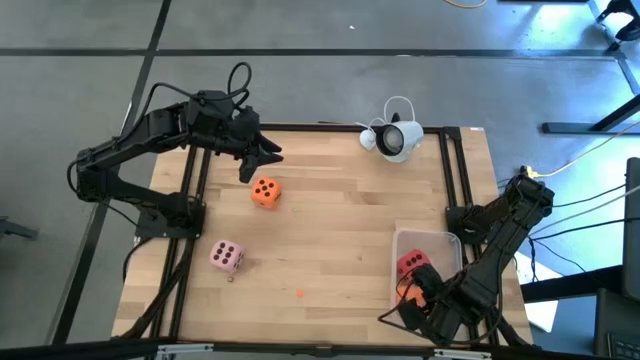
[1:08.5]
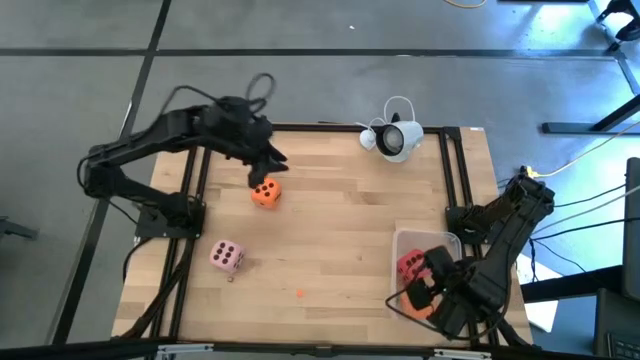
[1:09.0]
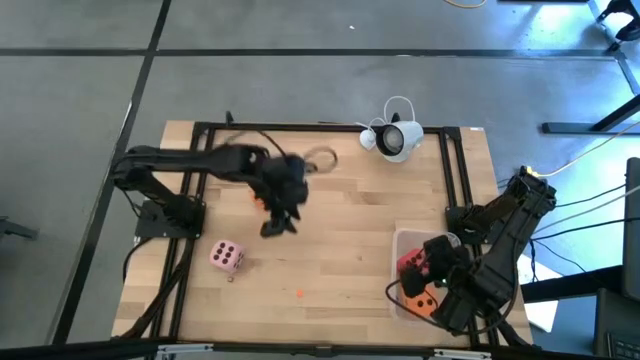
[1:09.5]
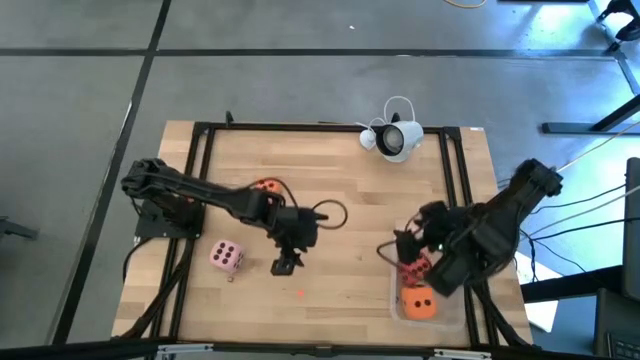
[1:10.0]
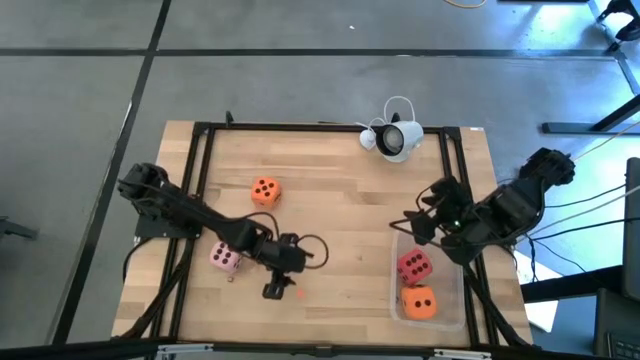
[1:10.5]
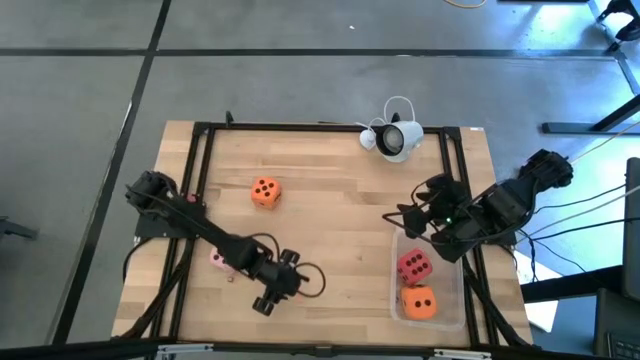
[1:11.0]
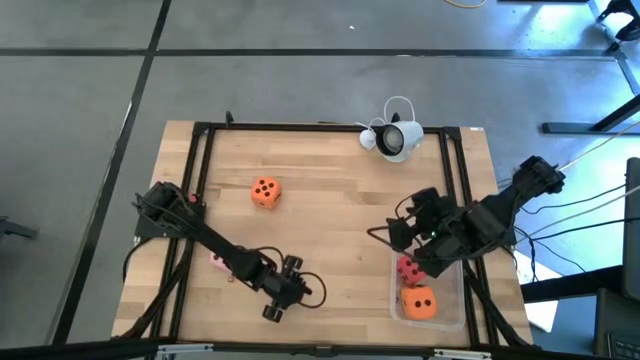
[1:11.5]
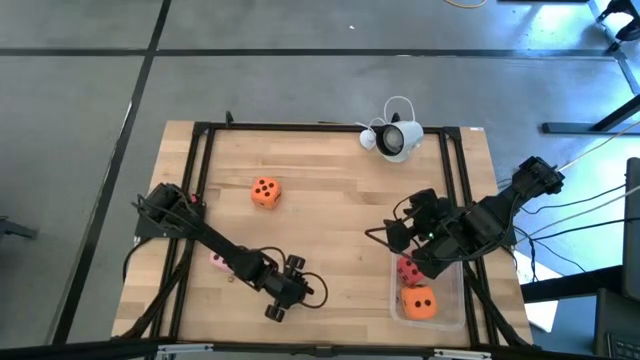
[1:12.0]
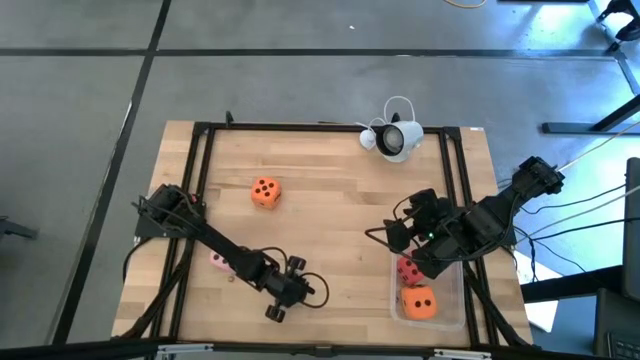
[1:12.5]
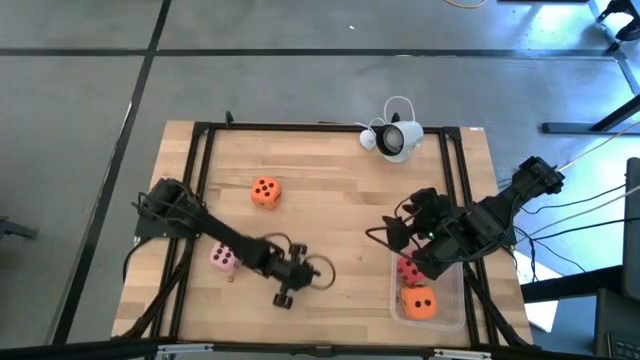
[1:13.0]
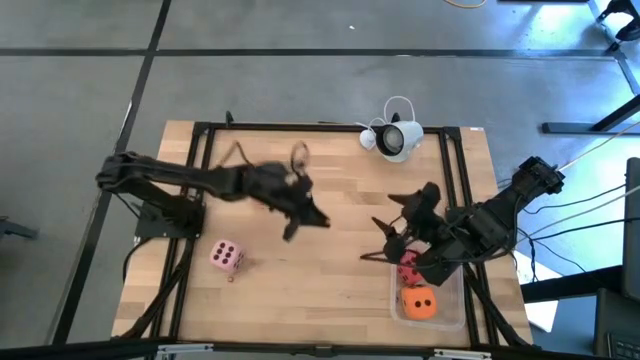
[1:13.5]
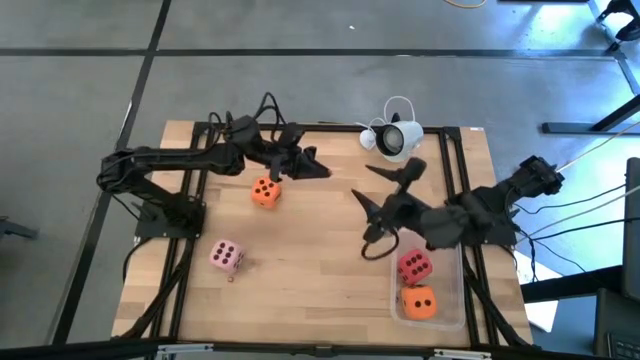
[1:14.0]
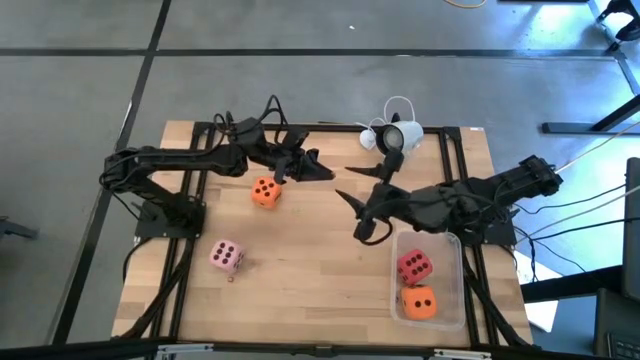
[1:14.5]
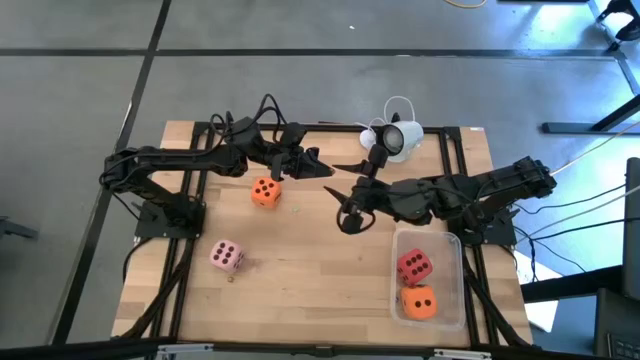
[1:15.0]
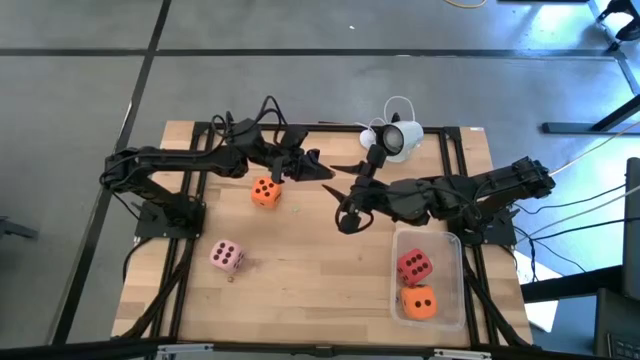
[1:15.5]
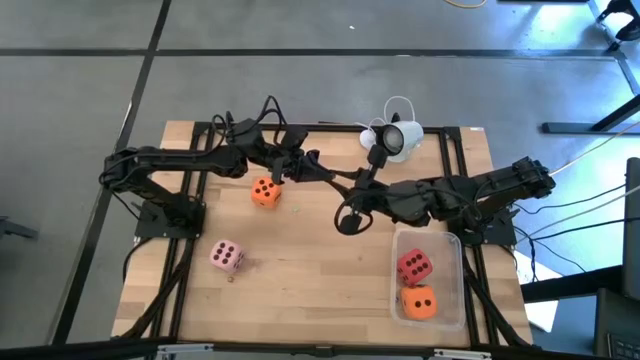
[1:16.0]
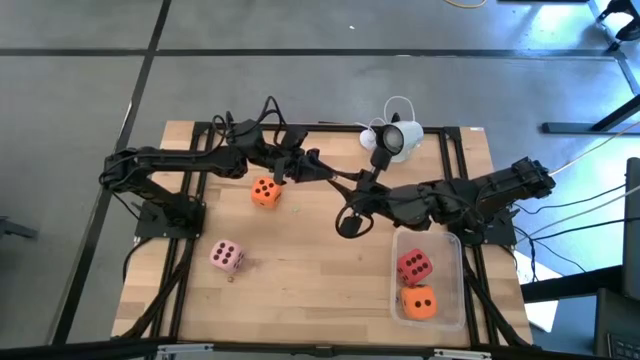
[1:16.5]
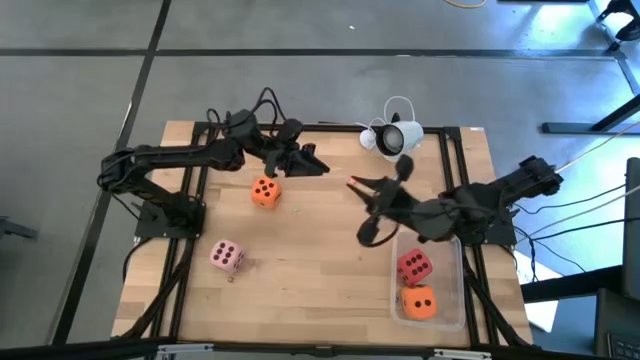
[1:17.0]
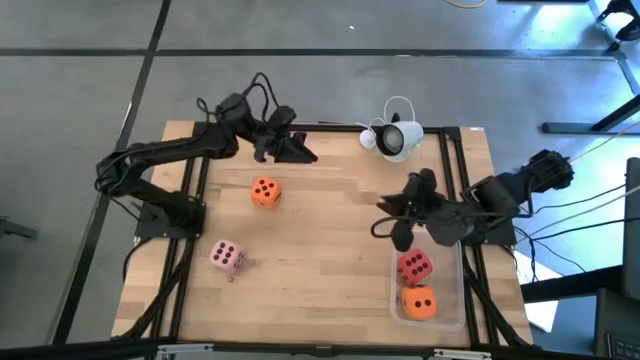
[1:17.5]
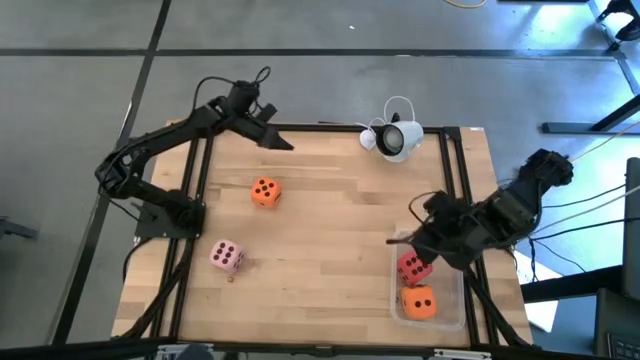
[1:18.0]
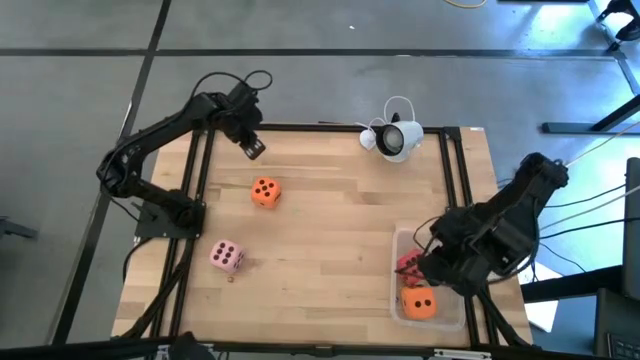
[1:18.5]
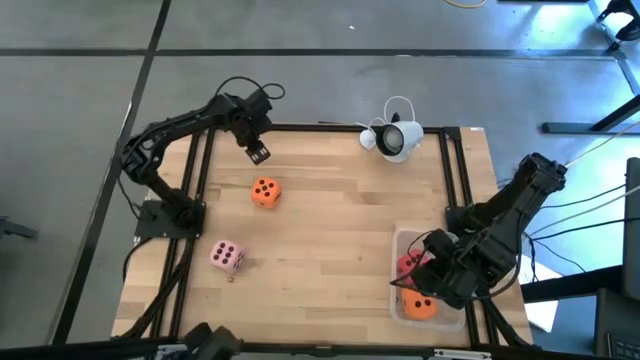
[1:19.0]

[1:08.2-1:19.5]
Task: Pick & Place Dice
Put the small orange die into the transparent bin

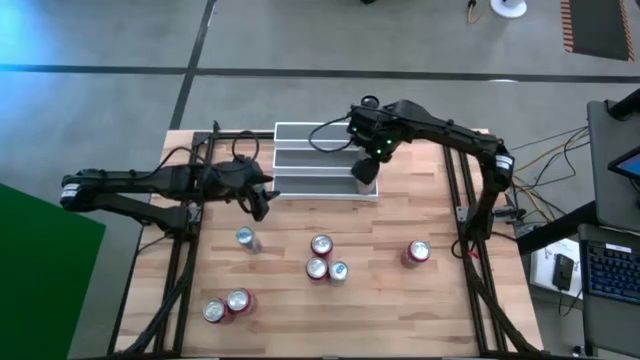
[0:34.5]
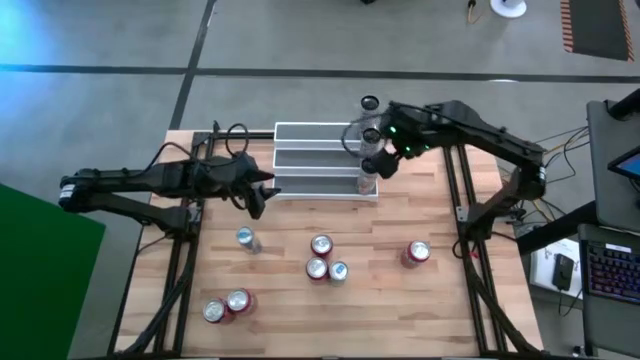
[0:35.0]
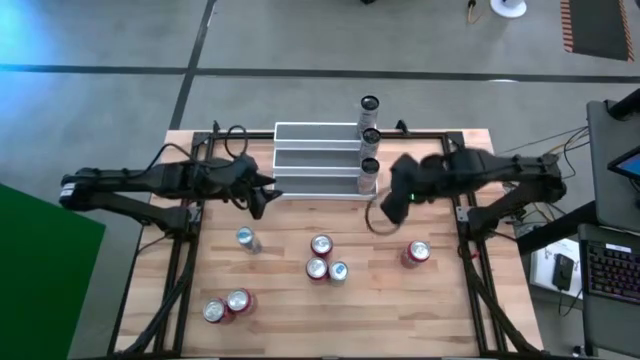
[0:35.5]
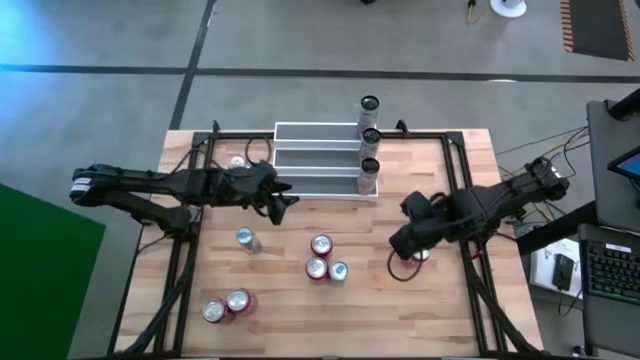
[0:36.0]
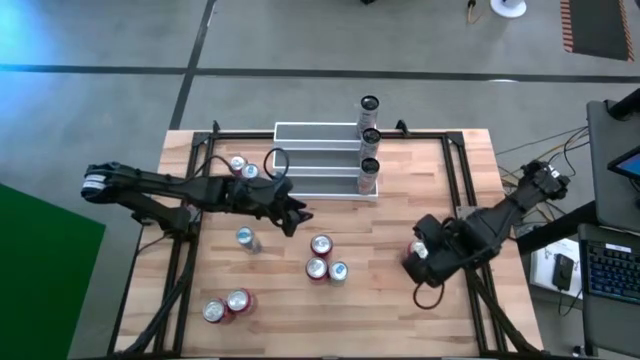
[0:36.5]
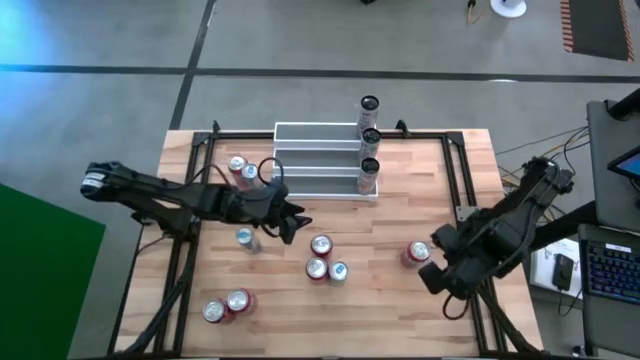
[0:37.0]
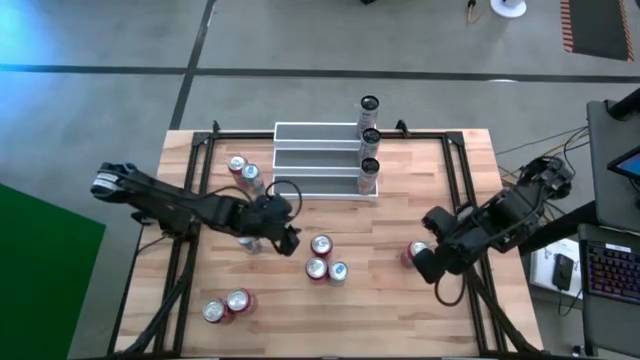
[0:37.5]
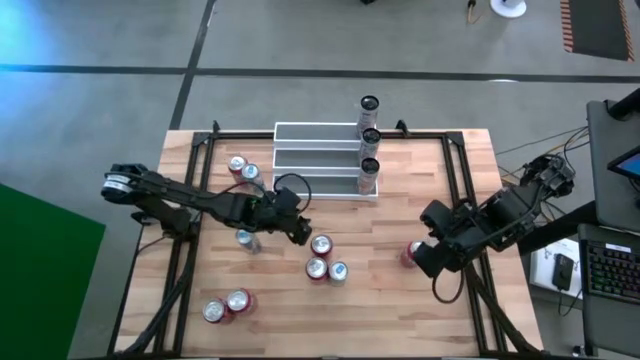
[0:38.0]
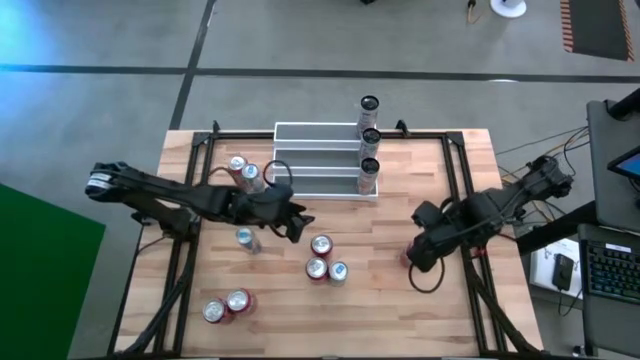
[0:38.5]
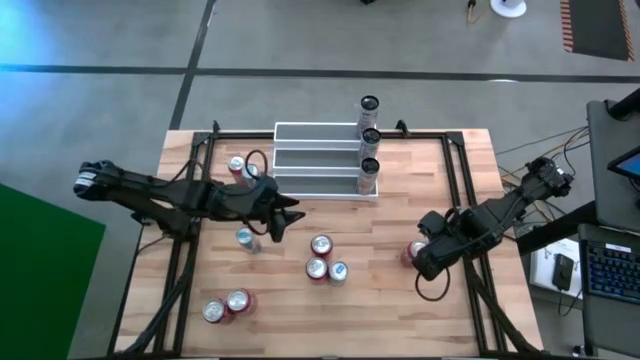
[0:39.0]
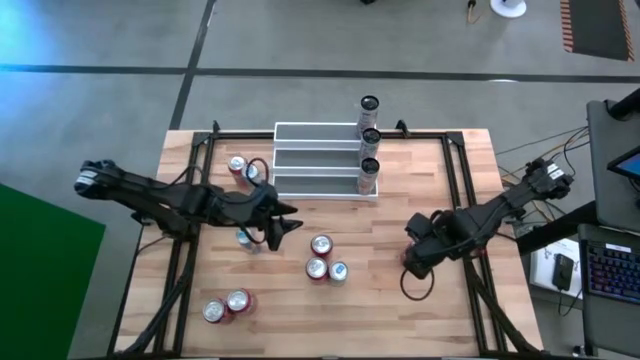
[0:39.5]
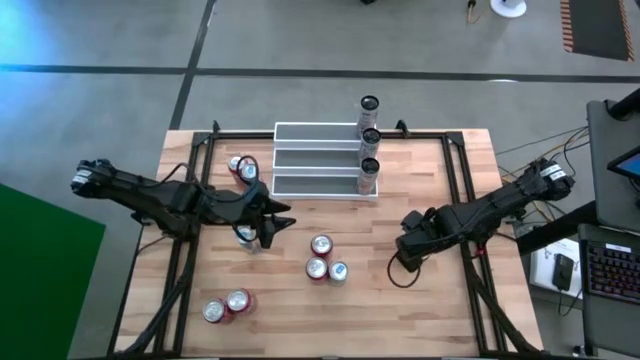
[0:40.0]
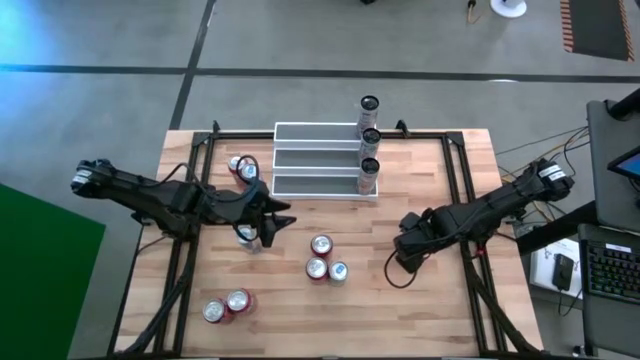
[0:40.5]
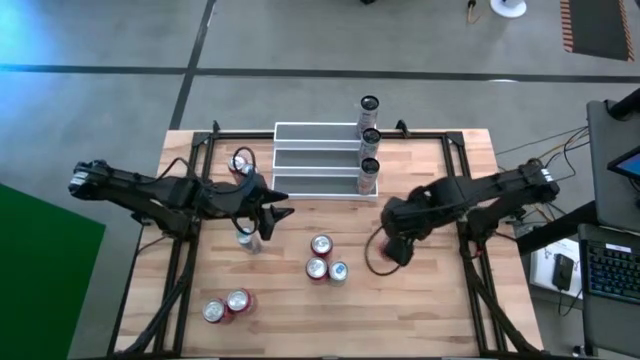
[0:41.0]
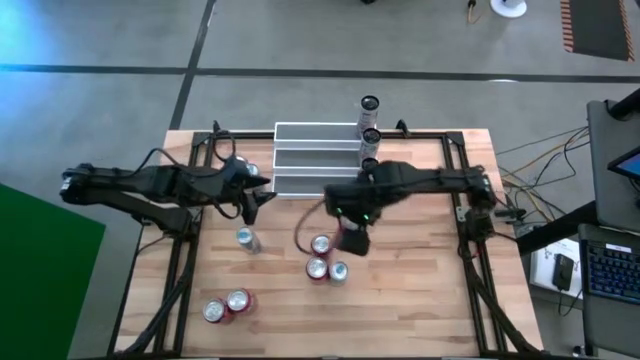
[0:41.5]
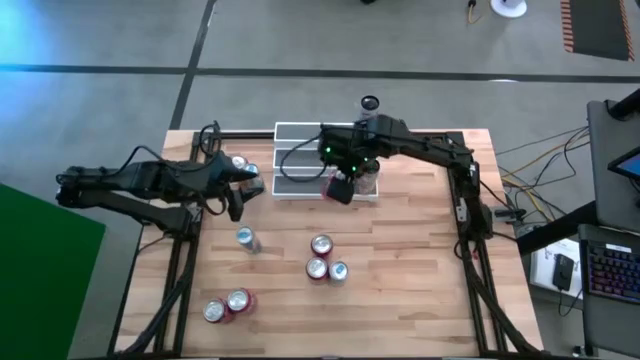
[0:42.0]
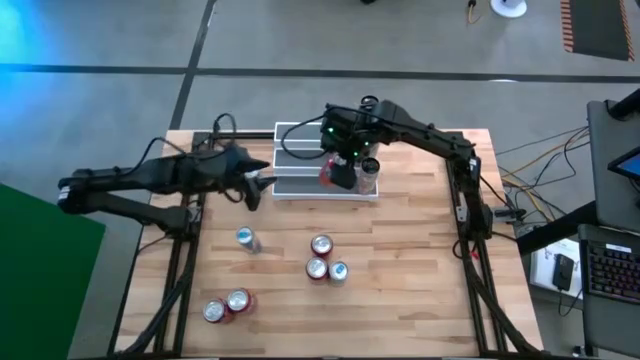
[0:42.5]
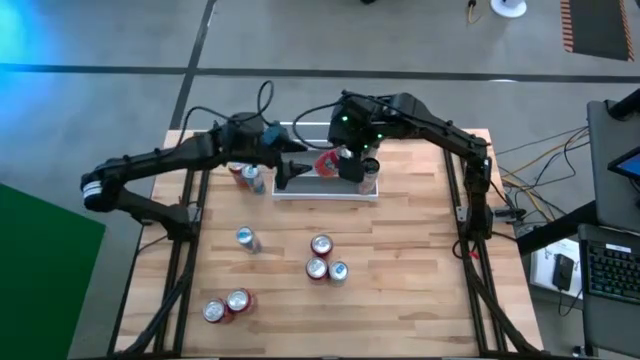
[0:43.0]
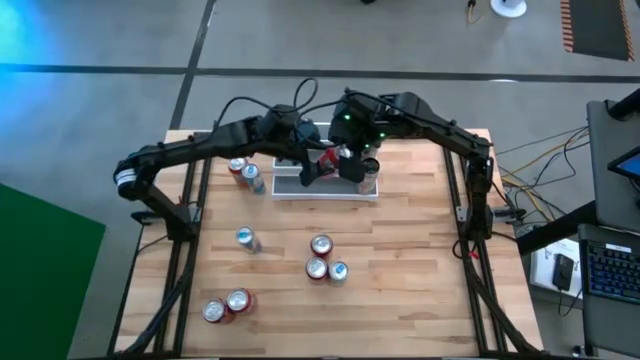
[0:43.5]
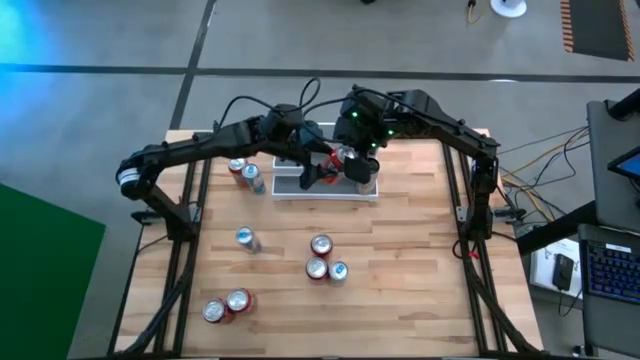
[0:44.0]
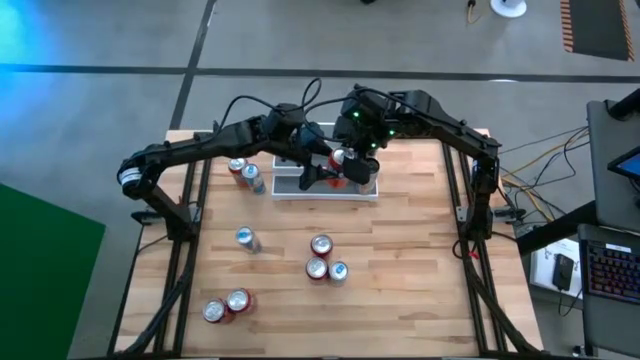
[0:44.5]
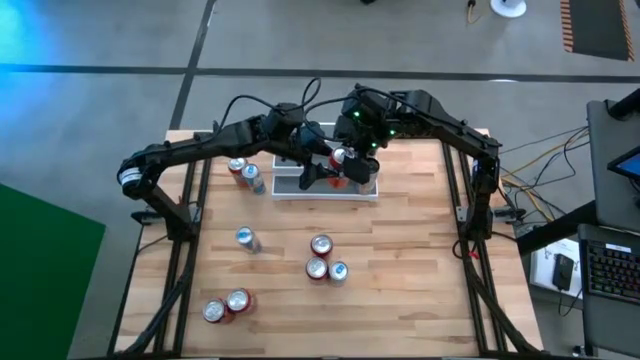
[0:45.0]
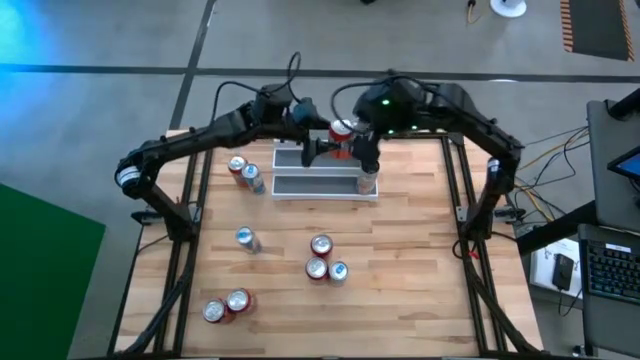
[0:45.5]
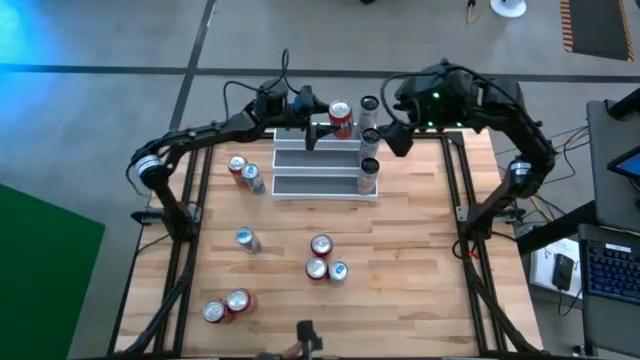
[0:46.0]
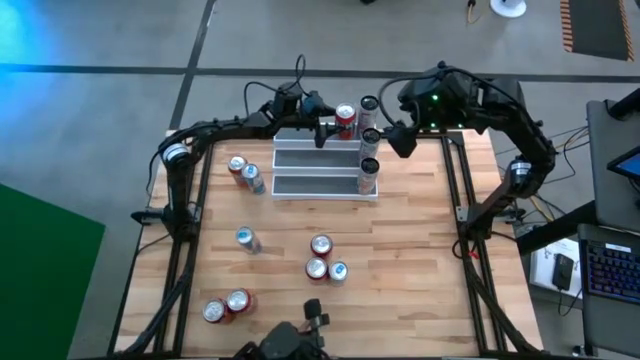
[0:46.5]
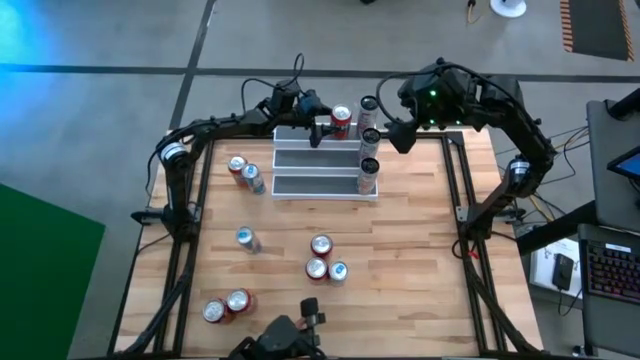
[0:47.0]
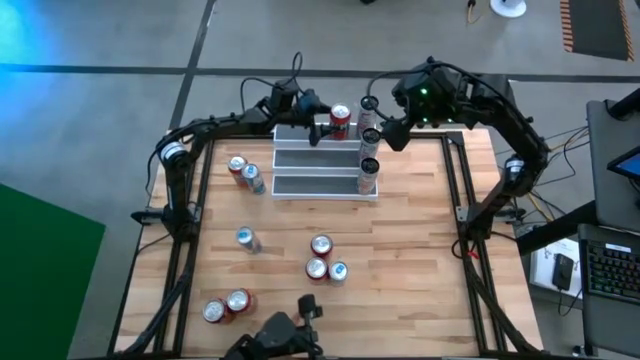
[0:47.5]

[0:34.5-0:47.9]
Task: Place canned beverage on shelf
Put the middle right orange soda can on the top tier of the shelf
